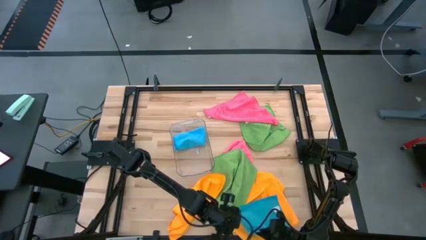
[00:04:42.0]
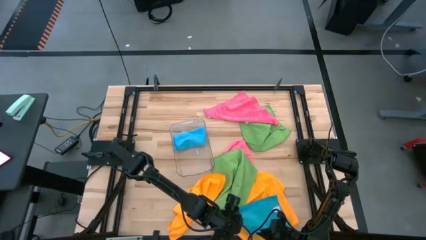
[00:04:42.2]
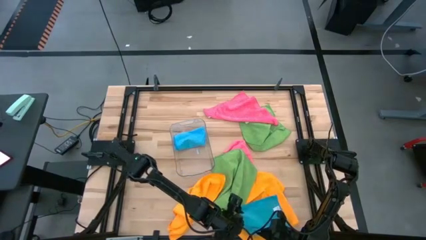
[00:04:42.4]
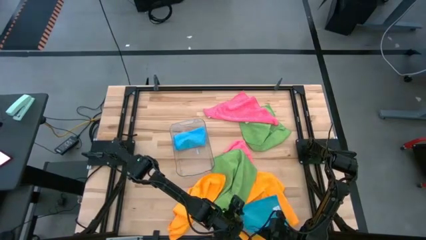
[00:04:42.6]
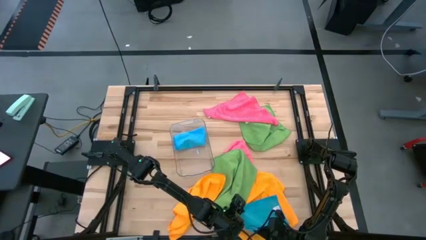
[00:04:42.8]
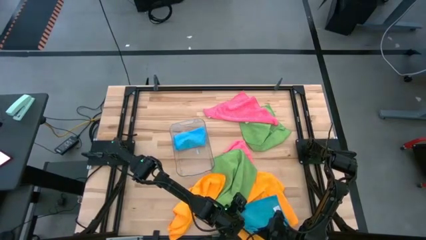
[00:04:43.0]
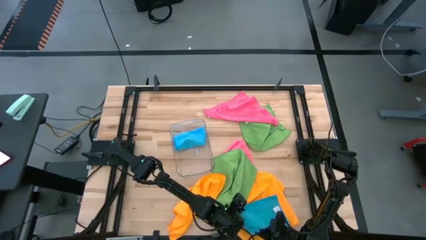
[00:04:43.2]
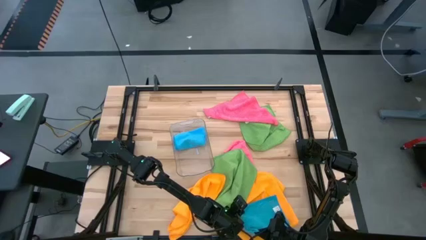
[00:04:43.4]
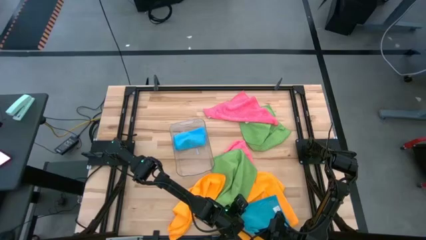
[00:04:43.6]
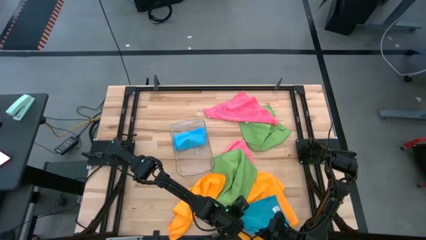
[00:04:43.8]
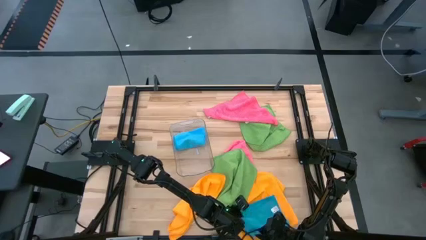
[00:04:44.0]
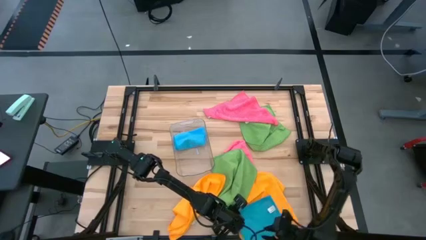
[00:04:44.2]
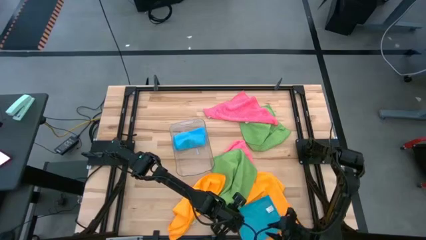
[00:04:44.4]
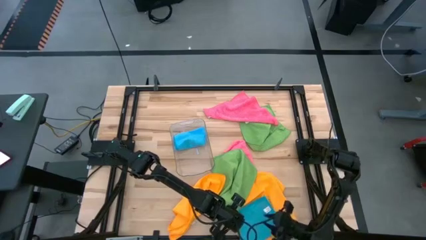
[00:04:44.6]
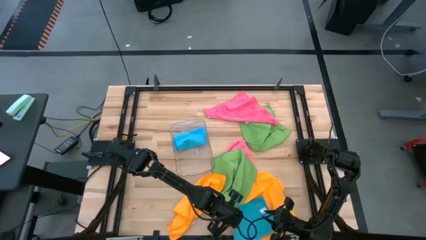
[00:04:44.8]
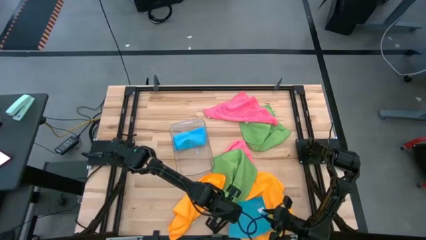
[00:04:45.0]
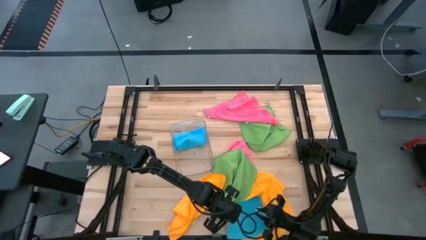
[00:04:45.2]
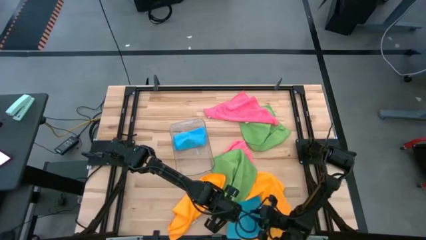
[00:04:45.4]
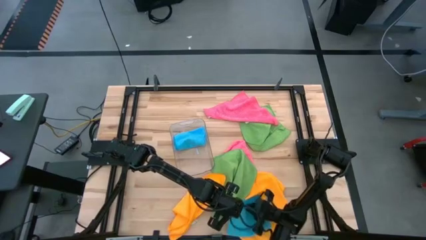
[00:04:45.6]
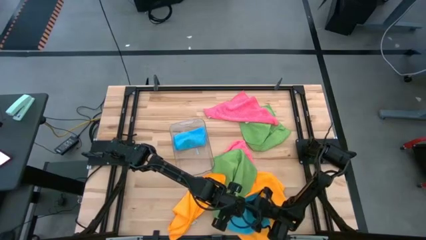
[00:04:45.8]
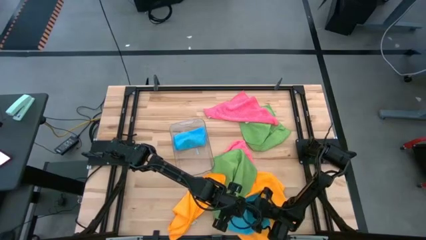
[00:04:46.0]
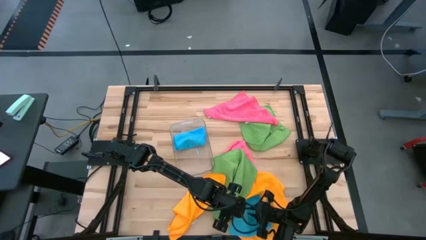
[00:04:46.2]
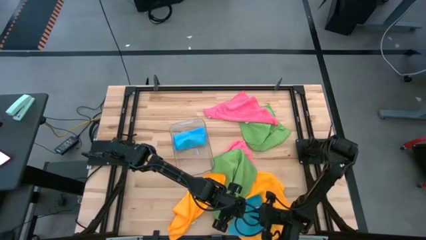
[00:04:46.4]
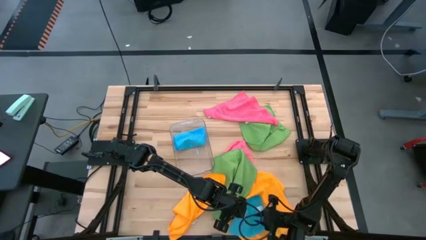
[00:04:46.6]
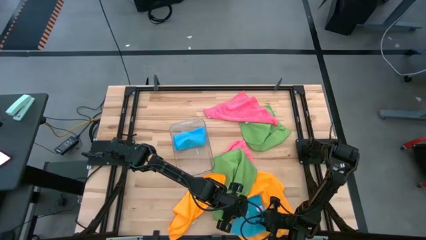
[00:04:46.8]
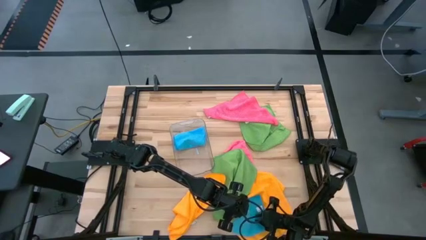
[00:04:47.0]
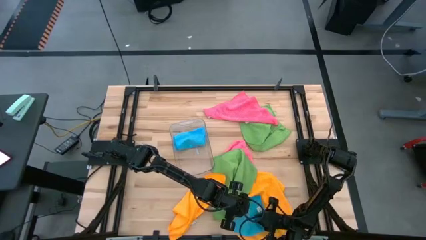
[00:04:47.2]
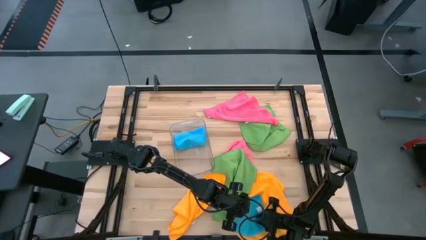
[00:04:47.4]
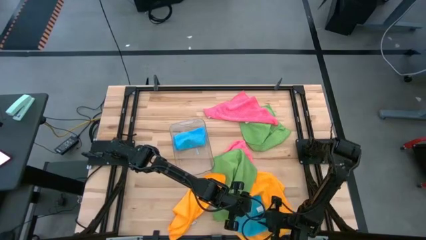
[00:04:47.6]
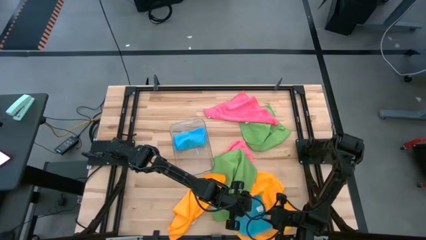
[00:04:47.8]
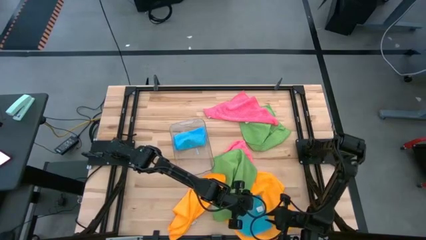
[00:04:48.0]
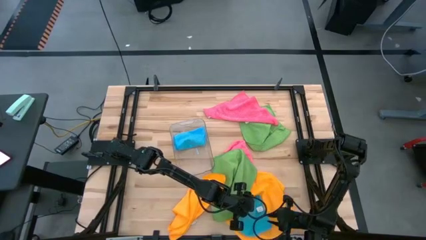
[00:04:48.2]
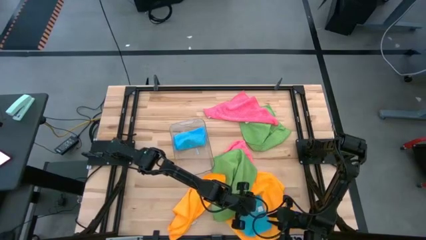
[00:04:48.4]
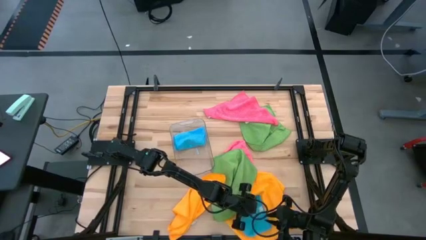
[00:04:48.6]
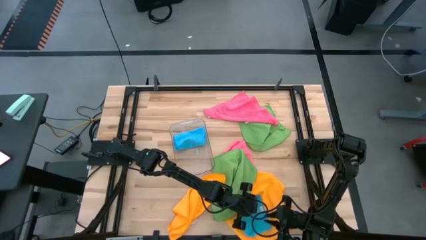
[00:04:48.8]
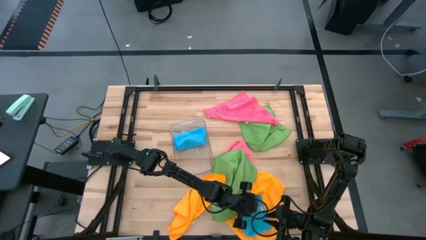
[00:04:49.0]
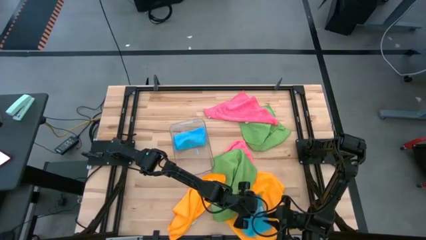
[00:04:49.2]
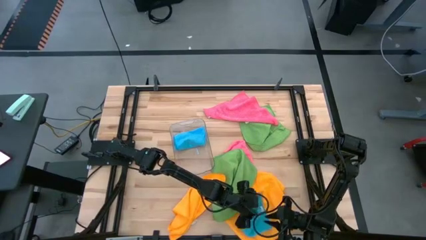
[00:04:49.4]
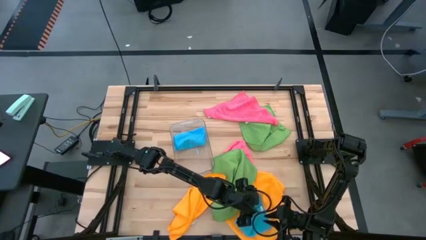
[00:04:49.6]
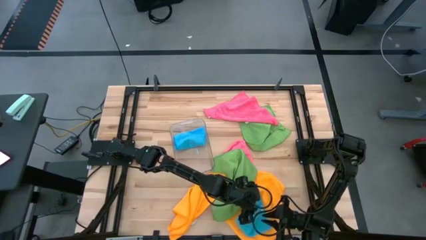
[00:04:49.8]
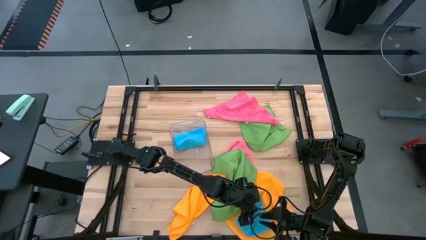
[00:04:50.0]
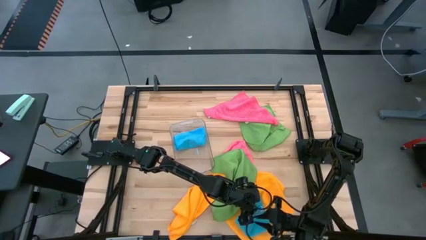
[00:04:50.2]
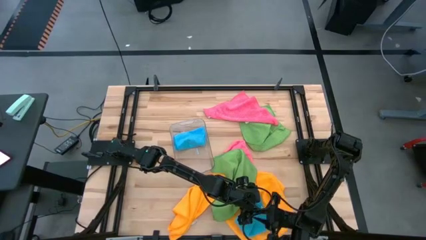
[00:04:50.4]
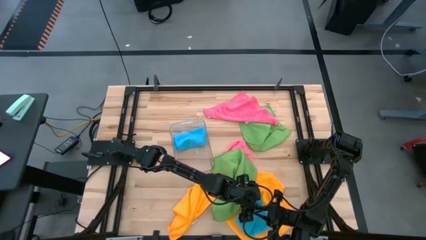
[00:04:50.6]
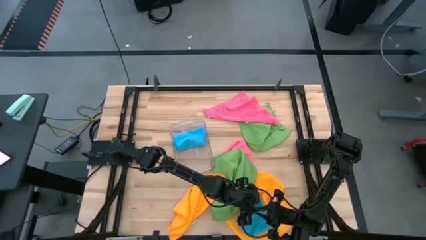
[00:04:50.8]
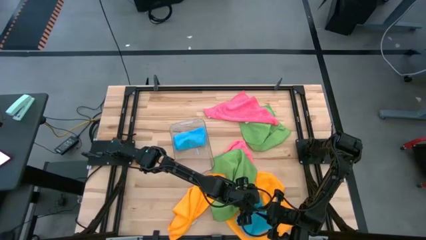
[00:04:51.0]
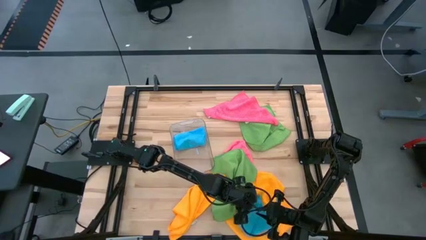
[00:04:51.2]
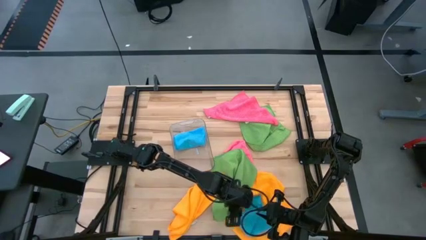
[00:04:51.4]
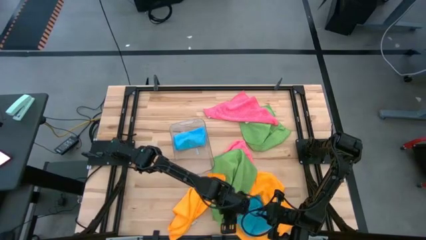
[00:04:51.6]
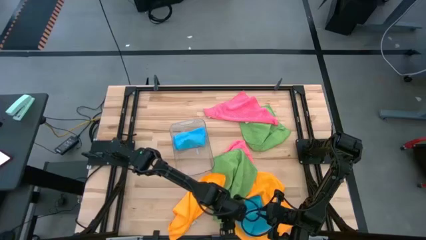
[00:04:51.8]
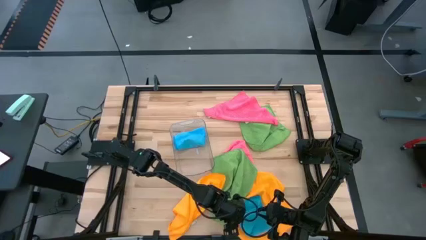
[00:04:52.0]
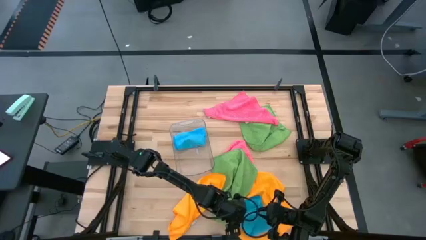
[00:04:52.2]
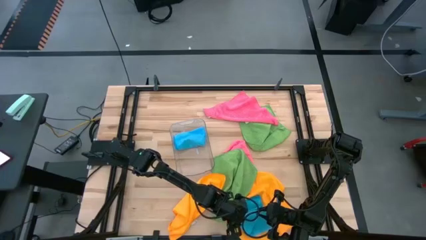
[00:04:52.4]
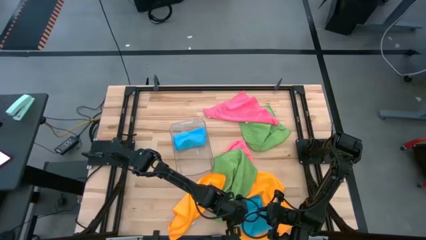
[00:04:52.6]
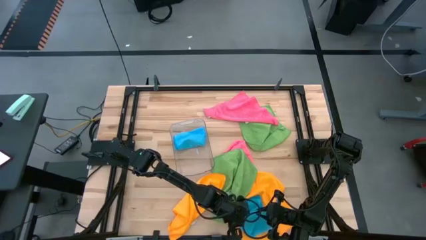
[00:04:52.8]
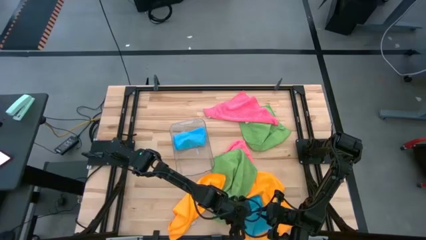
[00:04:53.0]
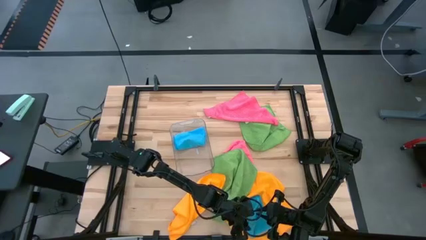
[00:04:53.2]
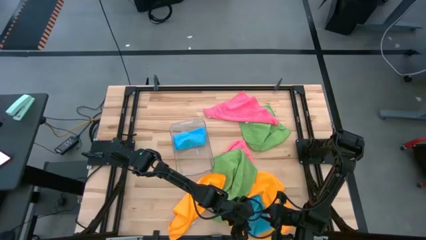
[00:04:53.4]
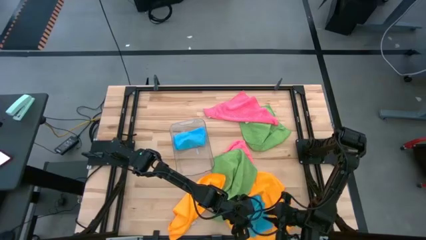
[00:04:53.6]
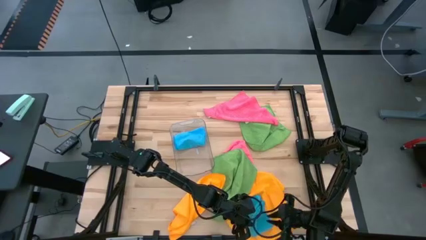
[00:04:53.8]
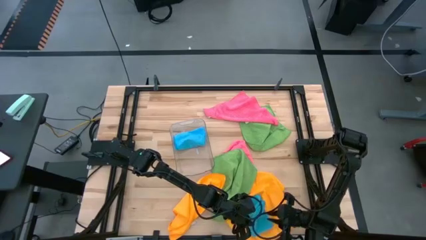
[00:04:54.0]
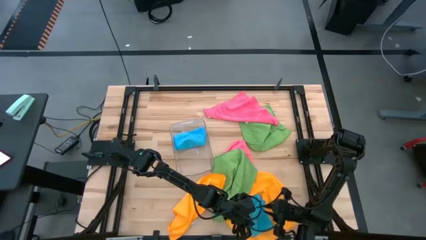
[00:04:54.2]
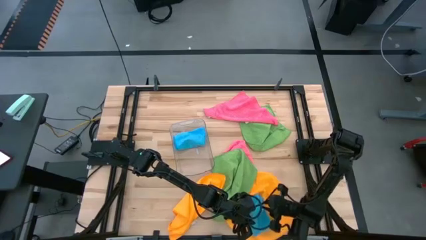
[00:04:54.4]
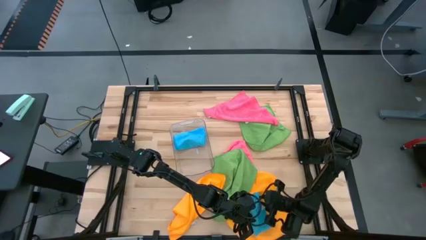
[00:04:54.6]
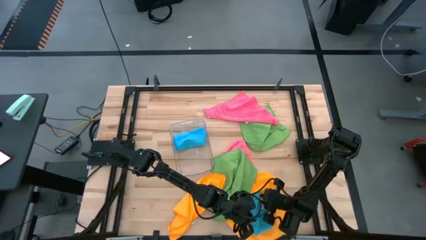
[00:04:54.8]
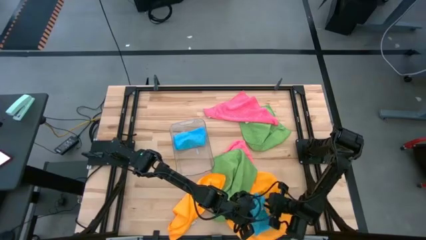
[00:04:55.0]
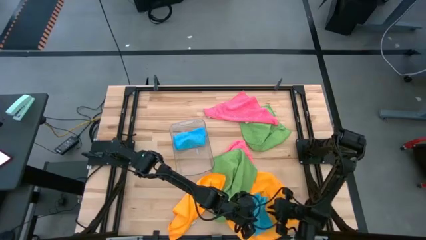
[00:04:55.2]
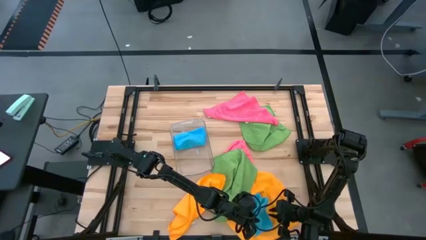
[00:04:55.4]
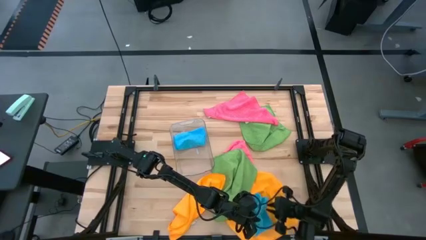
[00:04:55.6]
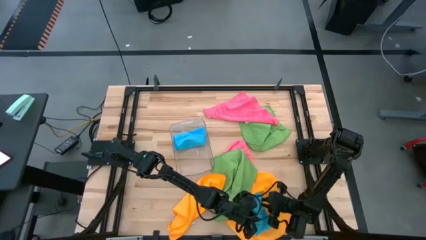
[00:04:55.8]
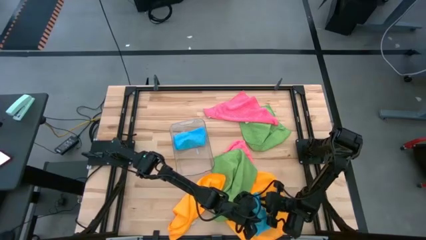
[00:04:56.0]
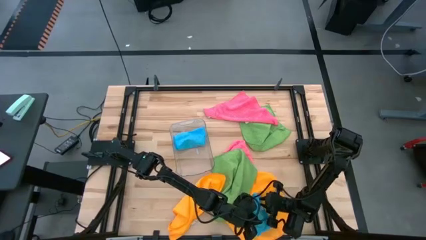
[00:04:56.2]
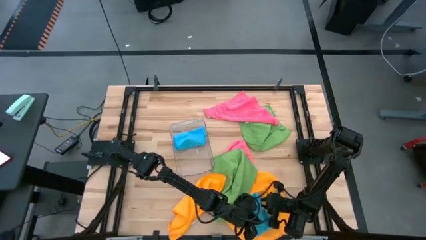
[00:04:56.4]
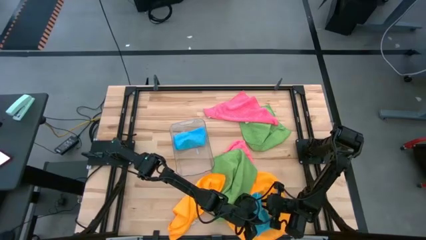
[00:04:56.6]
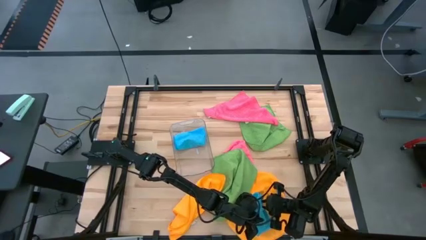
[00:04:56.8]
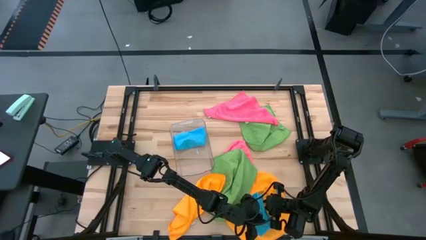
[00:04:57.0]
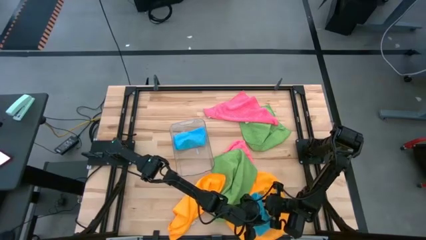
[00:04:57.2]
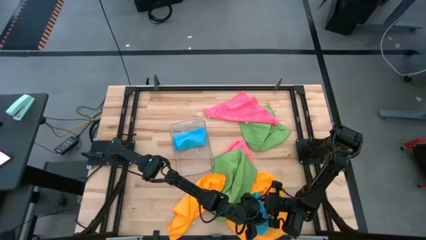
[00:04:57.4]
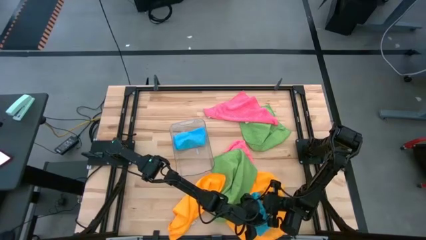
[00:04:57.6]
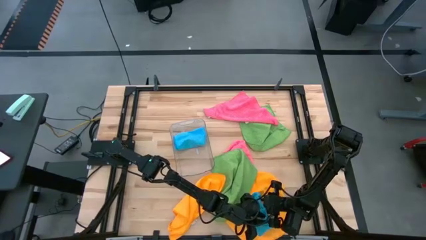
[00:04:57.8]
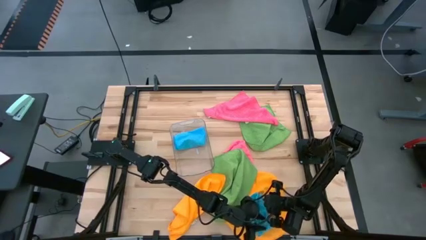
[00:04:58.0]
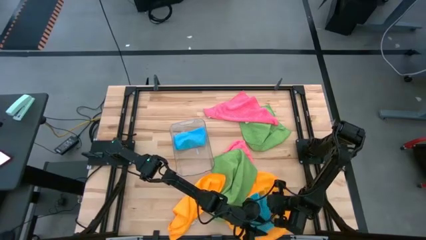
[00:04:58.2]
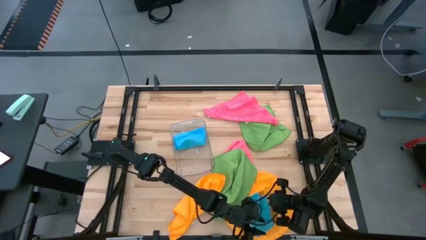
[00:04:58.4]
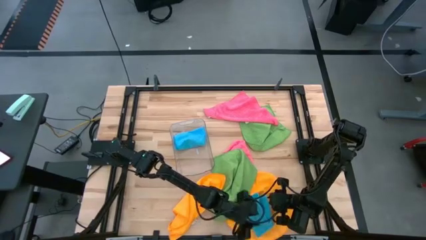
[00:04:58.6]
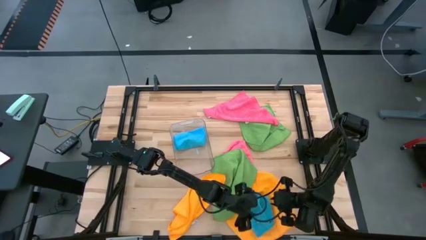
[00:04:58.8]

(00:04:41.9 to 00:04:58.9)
Task: Fold microfiber towels
Fold the blue towel
